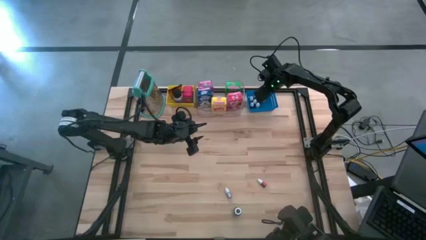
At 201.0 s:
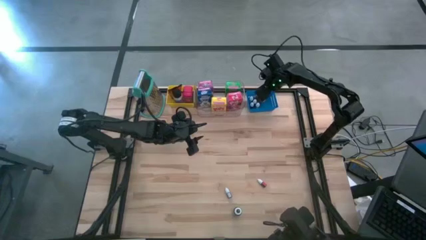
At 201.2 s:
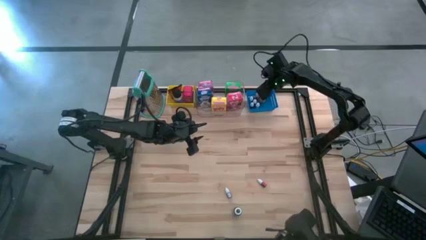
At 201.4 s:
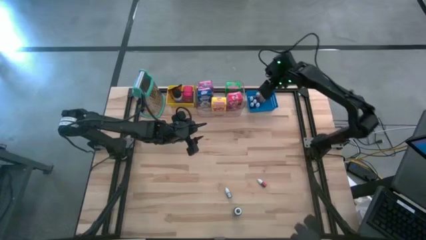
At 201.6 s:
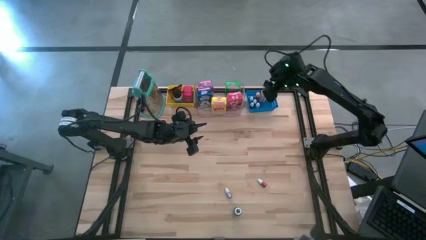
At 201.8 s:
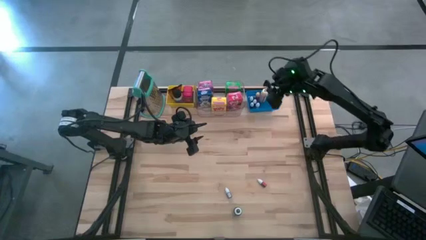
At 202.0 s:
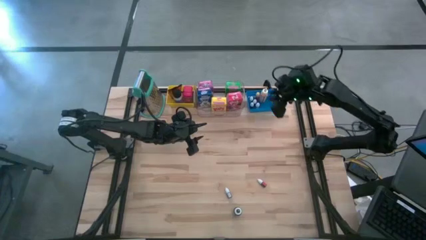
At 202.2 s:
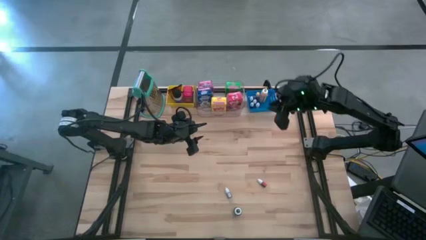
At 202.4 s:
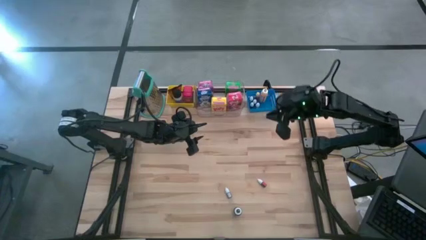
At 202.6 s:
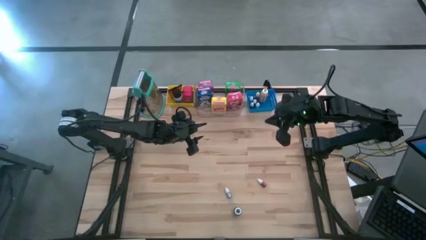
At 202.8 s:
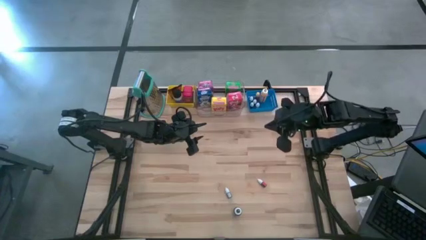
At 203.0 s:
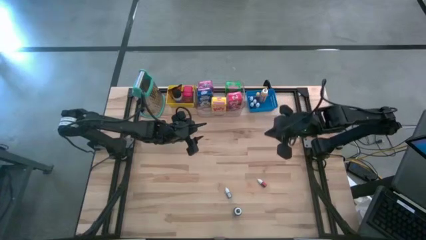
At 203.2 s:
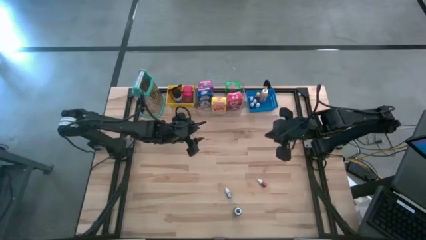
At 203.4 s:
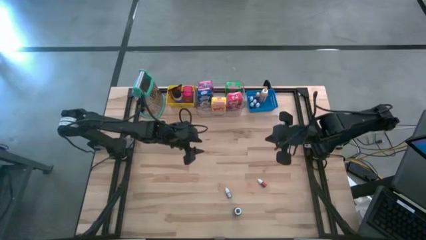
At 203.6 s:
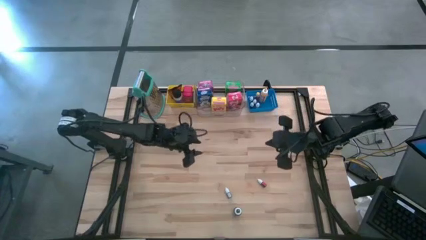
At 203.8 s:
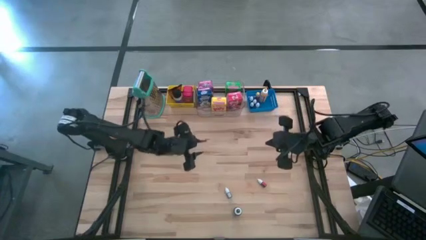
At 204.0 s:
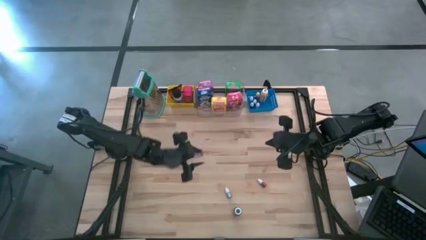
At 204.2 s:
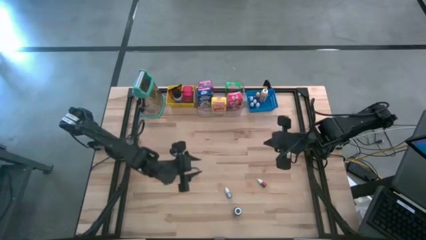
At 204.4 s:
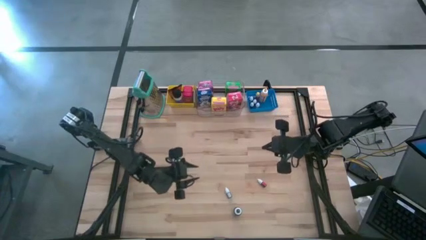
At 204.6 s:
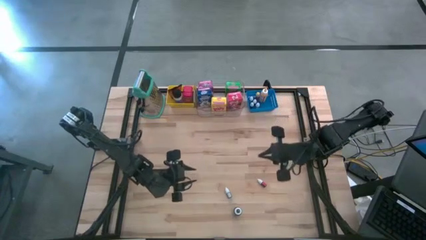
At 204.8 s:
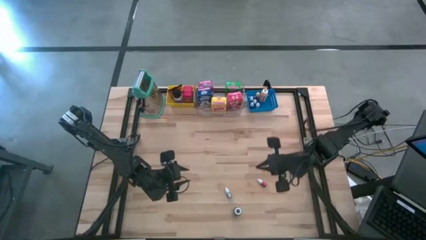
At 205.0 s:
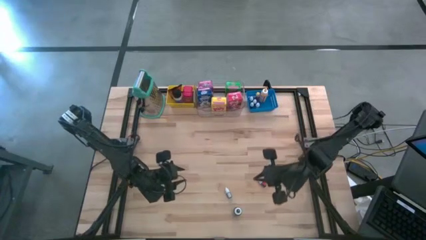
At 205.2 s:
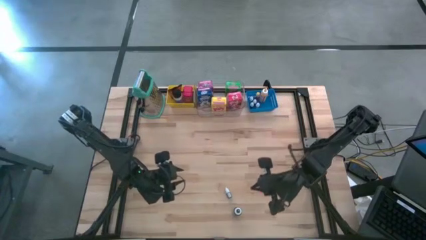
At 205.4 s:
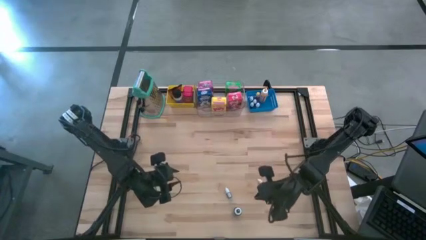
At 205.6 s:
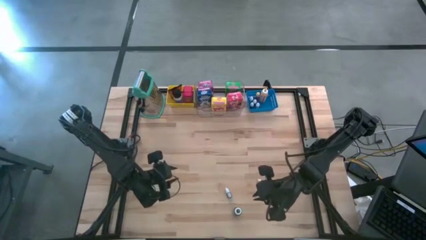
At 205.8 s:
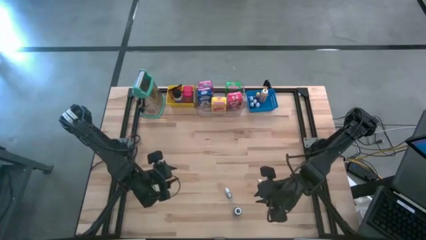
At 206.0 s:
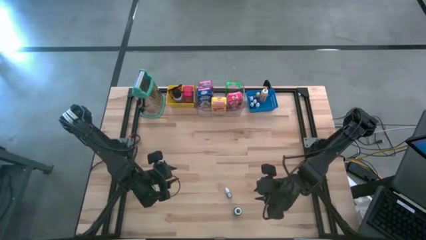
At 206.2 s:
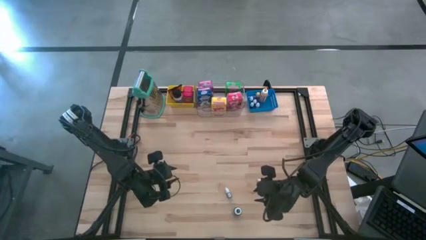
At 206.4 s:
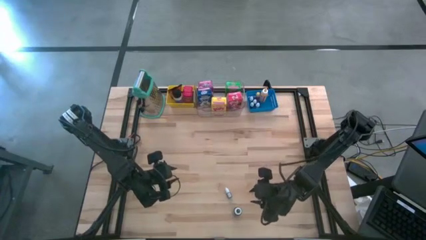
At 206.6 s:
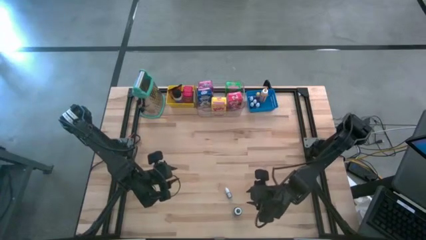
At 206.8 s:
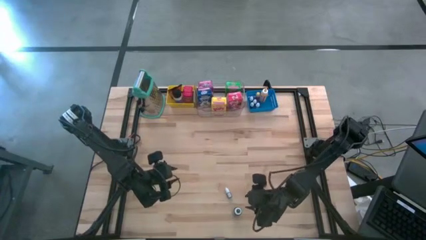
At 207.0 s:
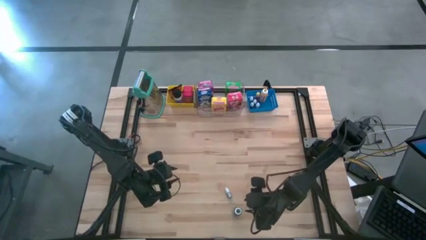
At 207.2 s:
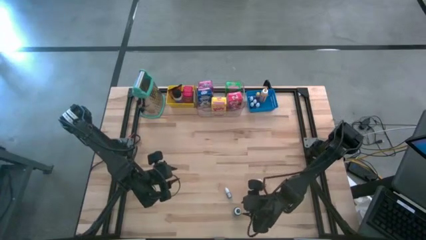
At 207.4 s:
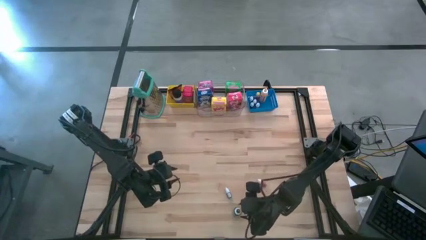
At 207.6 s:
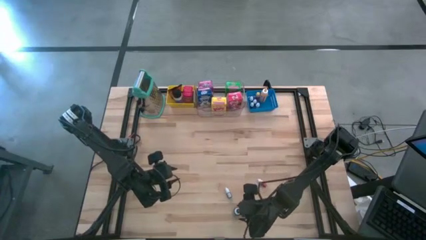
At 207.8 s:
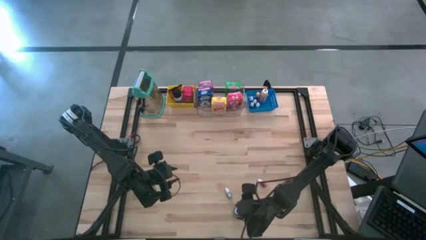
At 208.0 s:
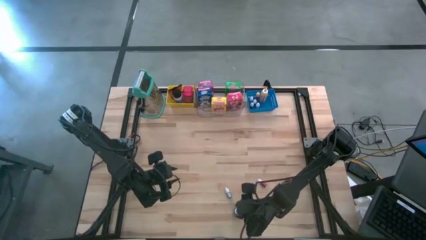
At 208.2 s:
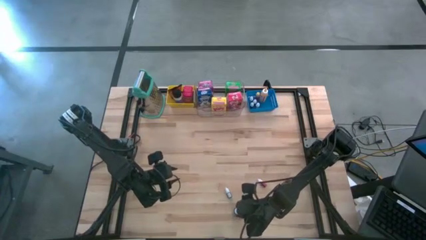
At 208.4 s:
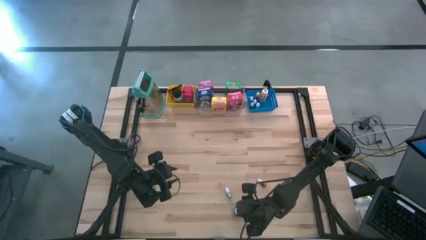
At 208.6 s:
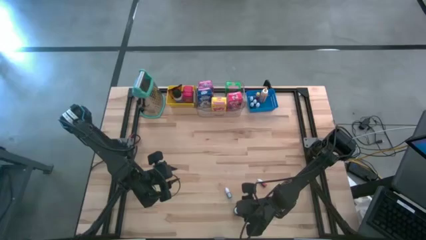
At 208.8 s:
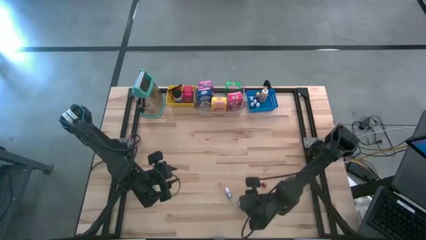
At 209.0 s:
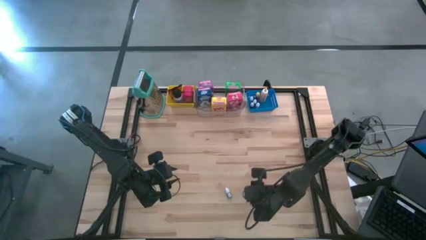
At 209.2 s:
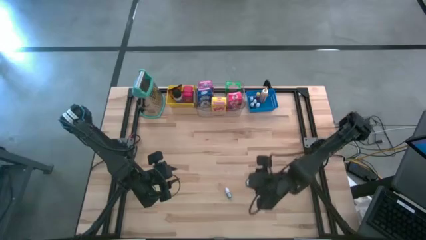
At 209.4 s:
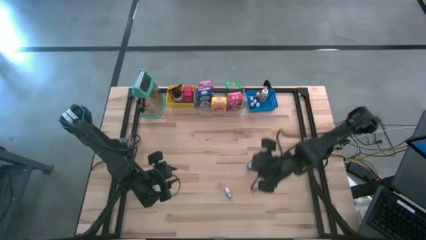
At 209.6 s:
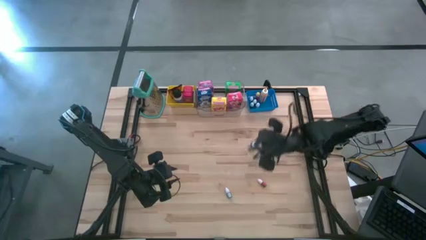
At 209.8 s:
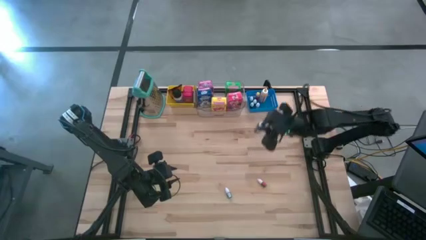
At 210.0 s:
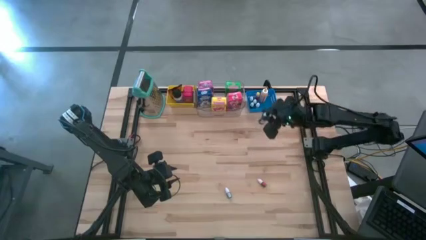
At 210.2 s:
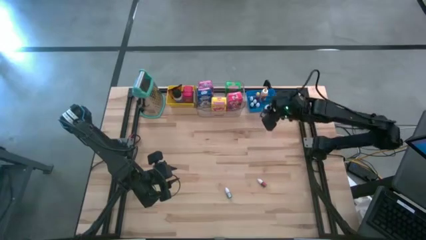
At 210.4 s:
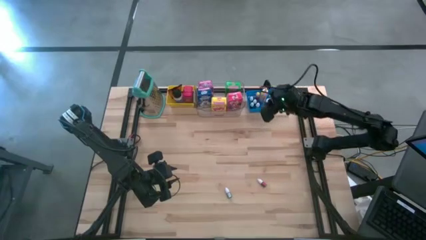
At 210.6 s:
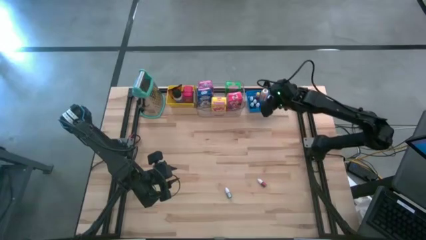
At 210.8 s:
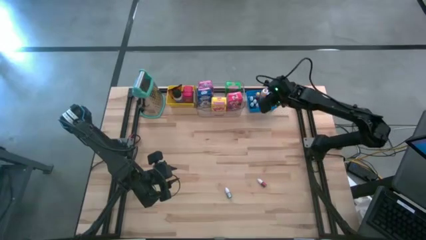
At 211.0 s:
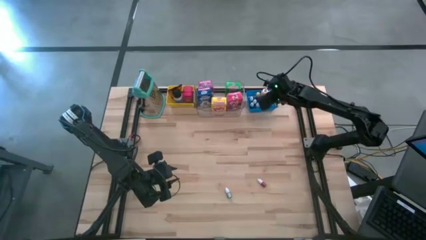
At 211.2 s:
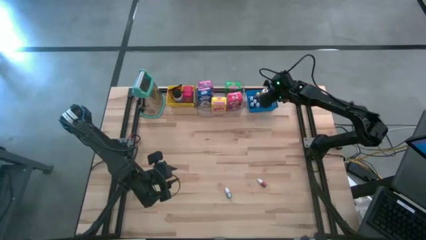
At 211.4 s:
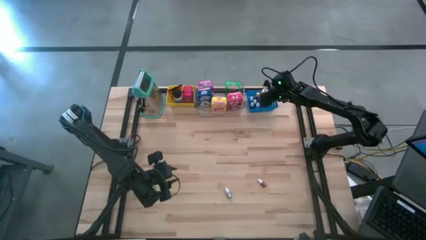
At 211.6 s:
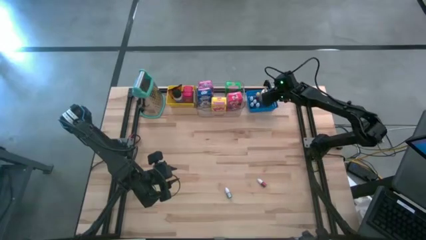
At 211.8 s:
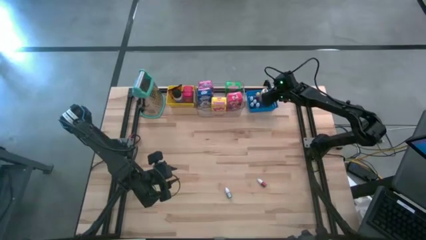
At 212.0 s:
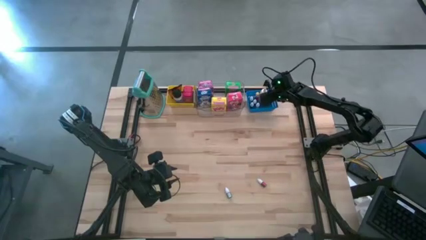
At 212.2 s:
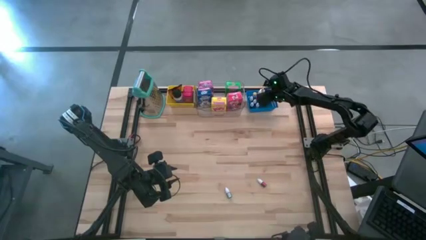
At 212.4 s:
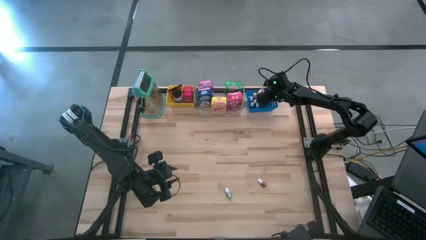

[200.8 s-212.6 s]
Task: Pick & Place Kitchen Items
Put the blue bottle into the blue bin
